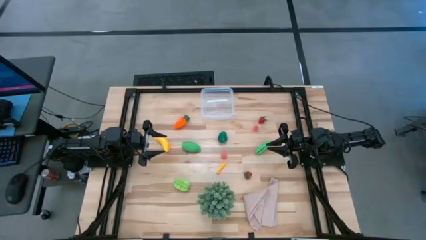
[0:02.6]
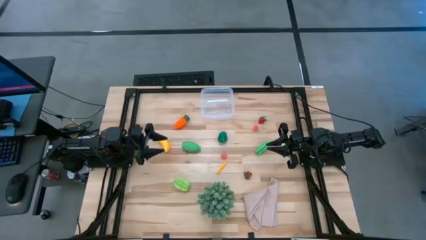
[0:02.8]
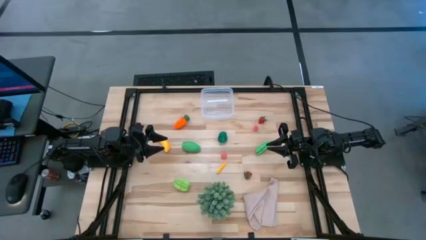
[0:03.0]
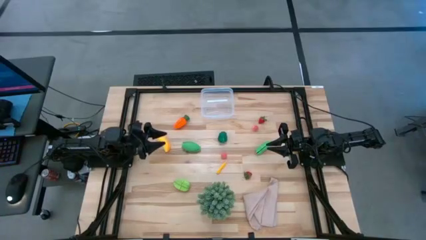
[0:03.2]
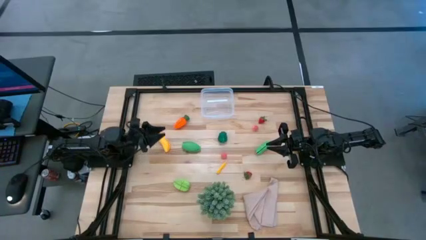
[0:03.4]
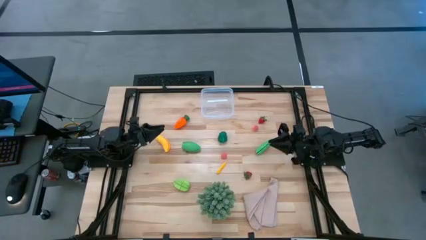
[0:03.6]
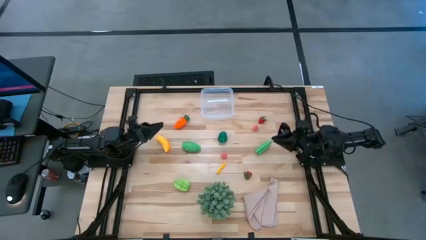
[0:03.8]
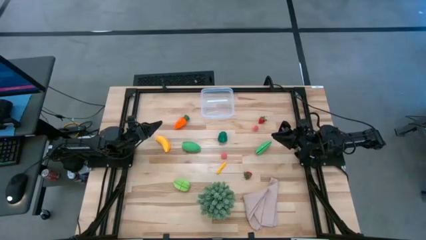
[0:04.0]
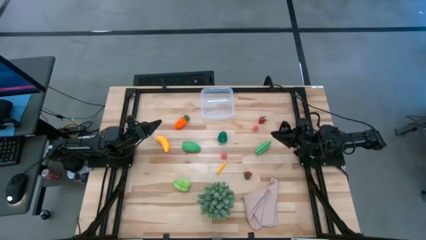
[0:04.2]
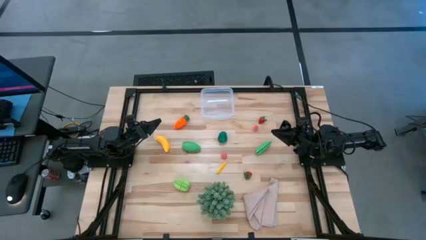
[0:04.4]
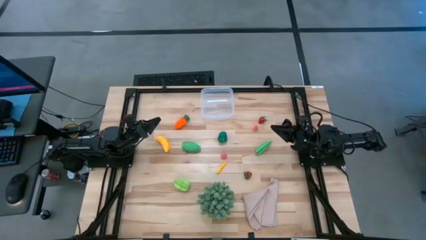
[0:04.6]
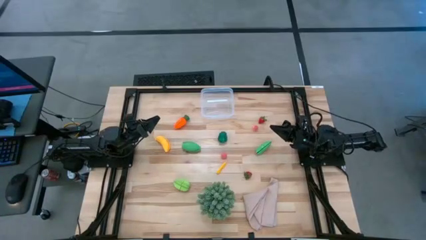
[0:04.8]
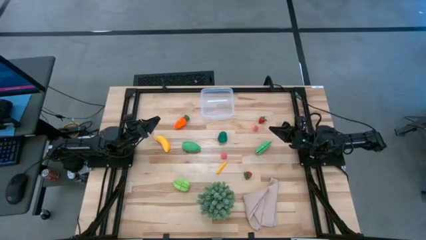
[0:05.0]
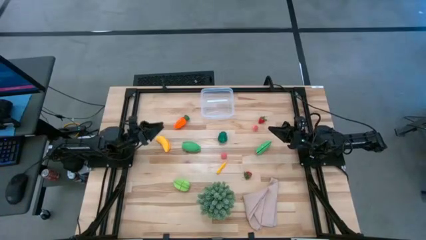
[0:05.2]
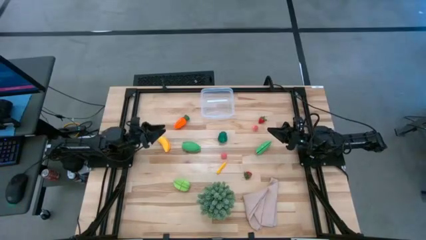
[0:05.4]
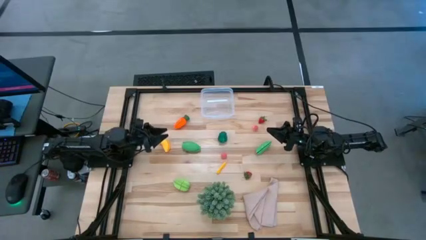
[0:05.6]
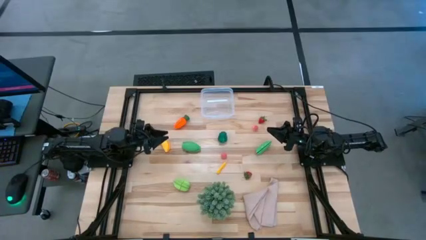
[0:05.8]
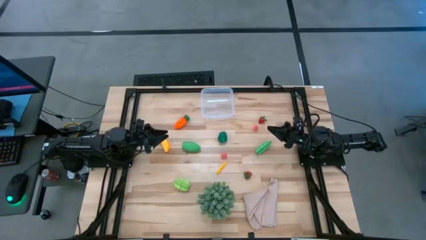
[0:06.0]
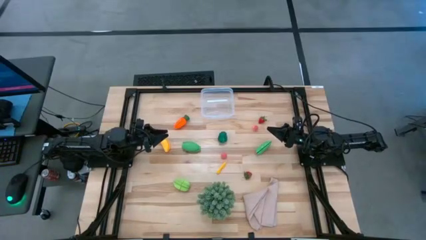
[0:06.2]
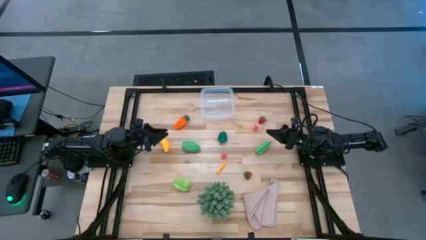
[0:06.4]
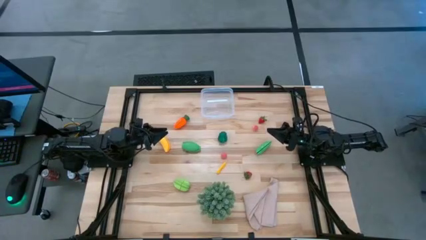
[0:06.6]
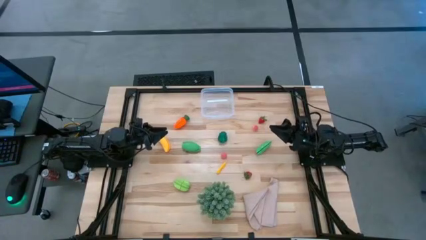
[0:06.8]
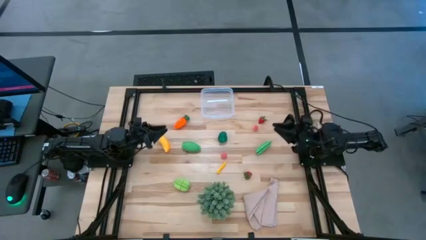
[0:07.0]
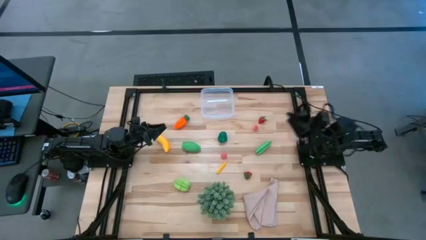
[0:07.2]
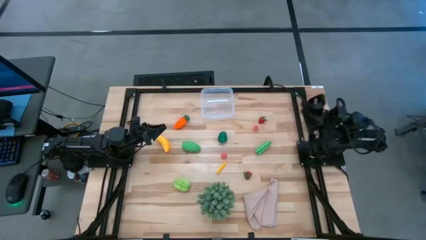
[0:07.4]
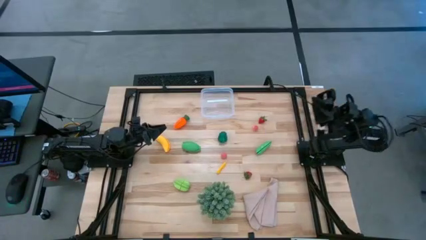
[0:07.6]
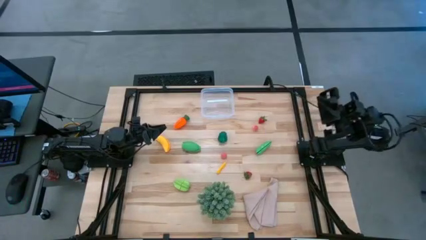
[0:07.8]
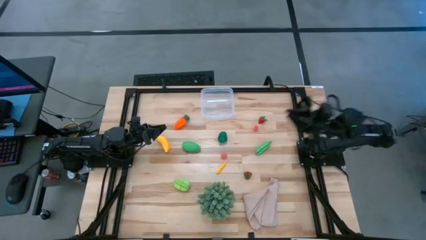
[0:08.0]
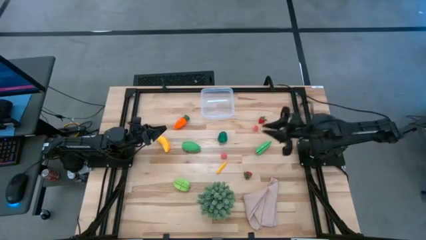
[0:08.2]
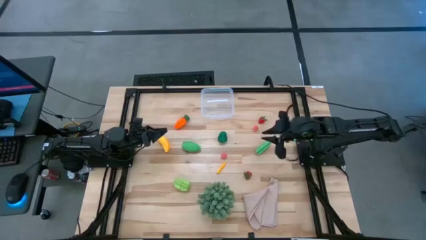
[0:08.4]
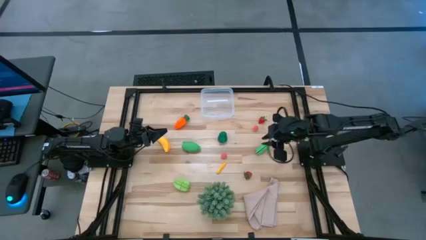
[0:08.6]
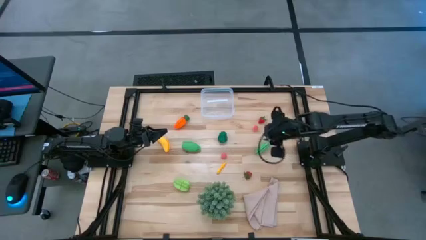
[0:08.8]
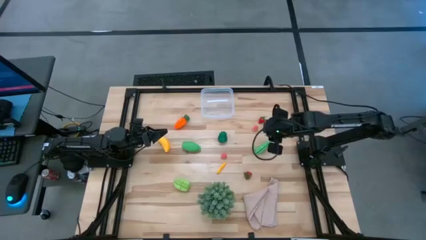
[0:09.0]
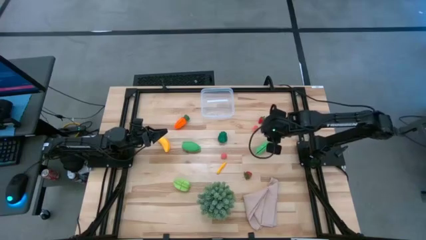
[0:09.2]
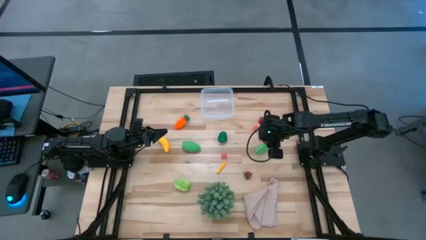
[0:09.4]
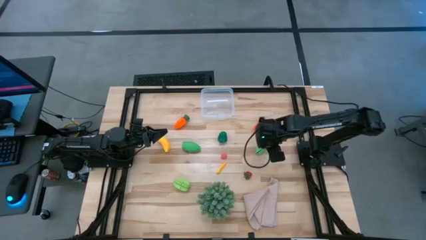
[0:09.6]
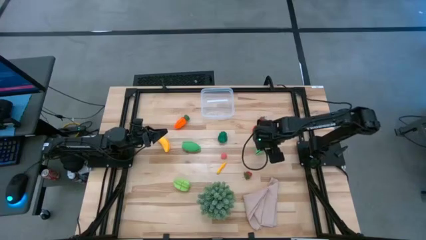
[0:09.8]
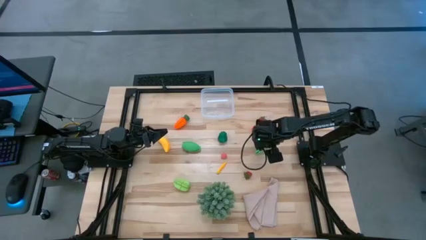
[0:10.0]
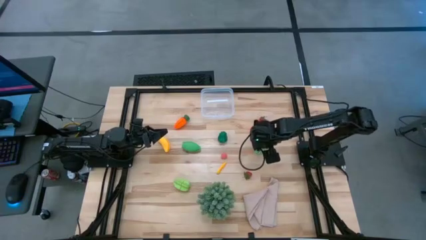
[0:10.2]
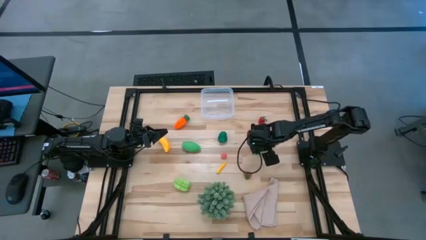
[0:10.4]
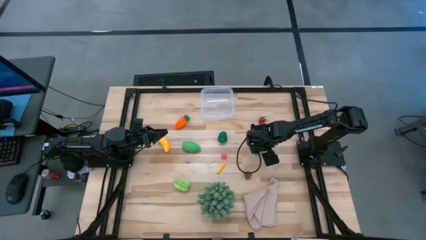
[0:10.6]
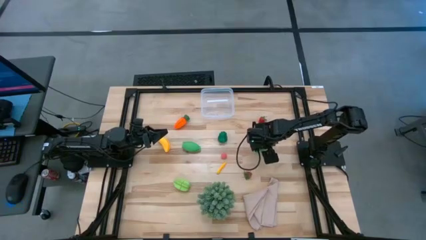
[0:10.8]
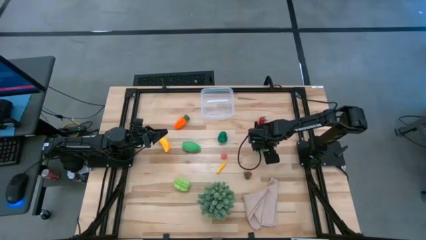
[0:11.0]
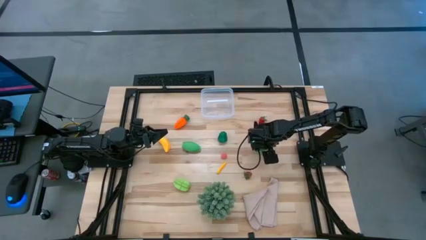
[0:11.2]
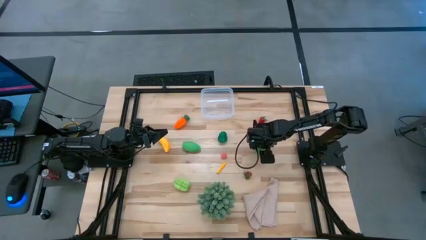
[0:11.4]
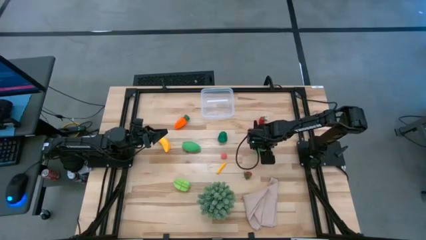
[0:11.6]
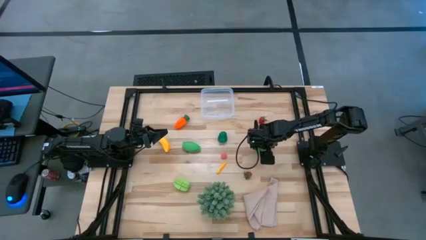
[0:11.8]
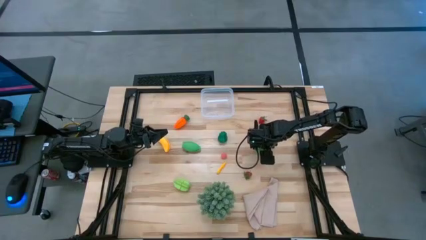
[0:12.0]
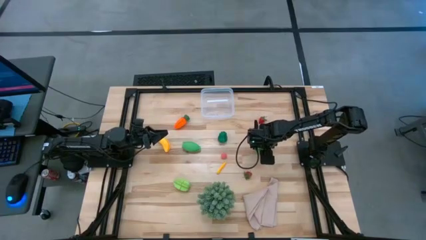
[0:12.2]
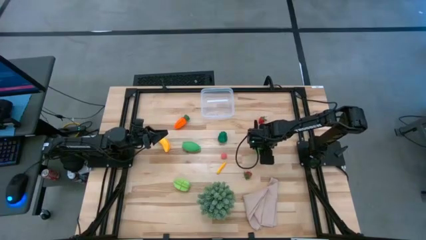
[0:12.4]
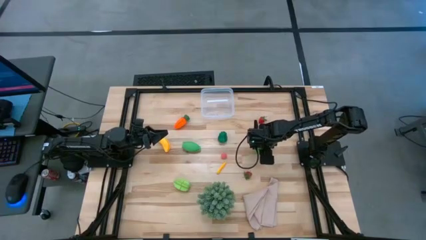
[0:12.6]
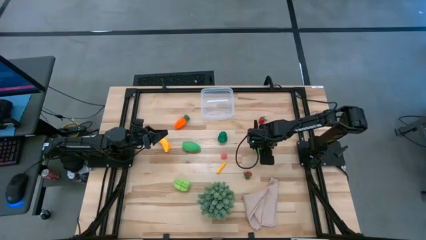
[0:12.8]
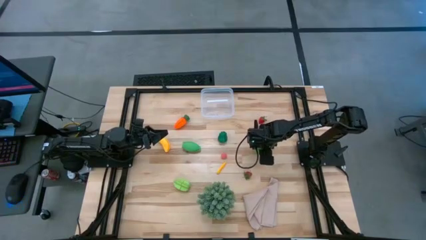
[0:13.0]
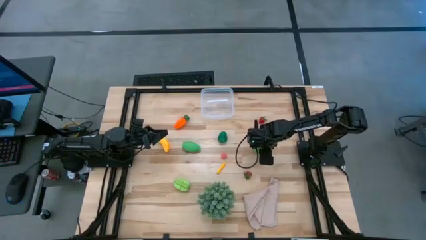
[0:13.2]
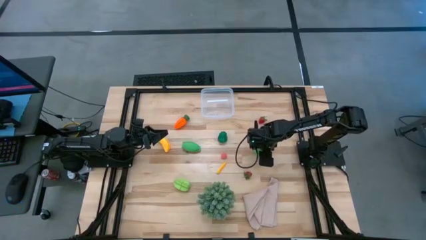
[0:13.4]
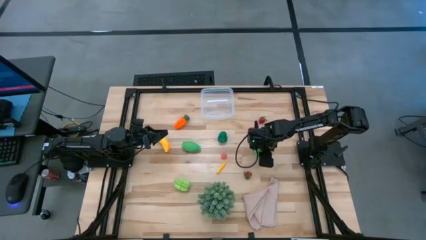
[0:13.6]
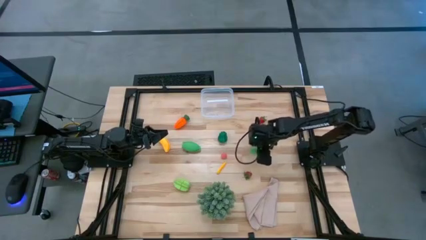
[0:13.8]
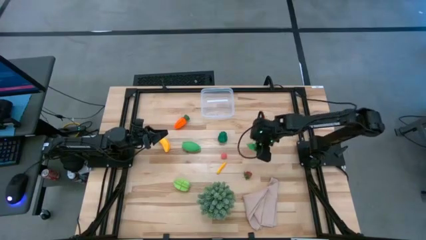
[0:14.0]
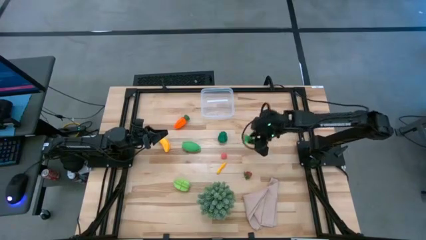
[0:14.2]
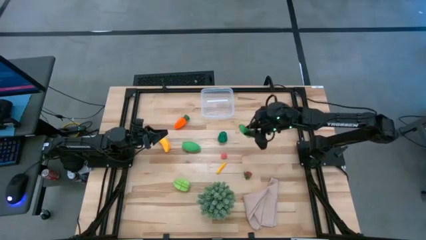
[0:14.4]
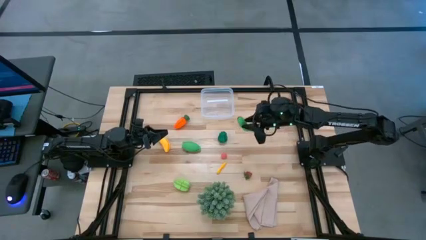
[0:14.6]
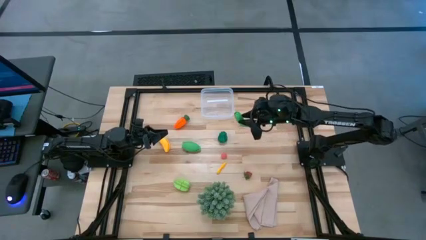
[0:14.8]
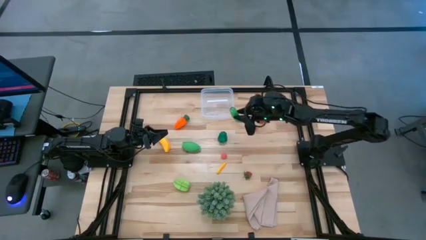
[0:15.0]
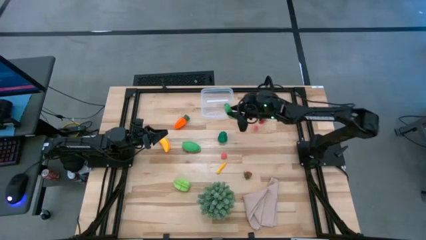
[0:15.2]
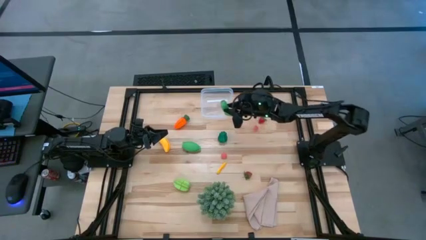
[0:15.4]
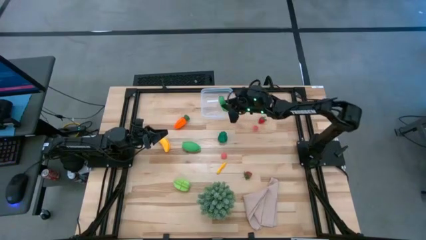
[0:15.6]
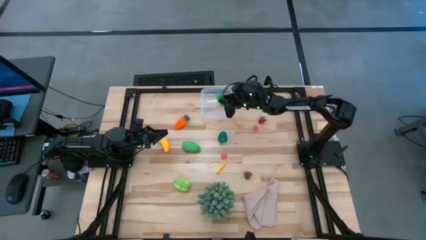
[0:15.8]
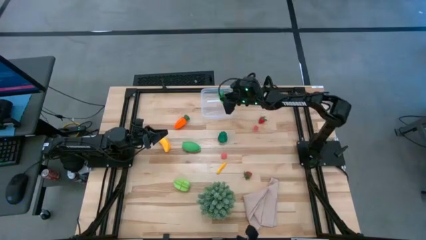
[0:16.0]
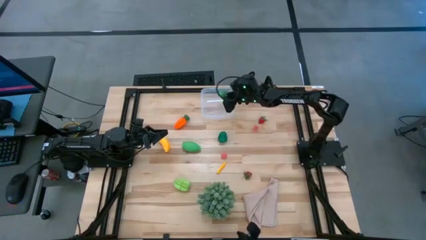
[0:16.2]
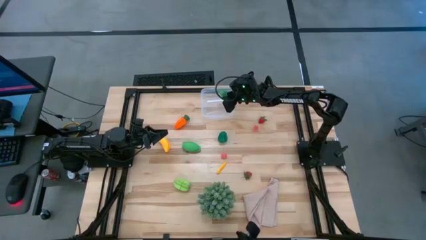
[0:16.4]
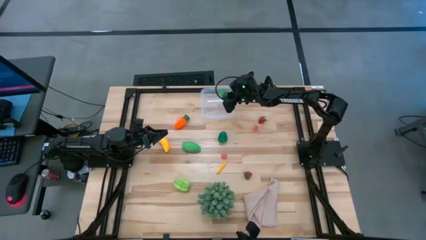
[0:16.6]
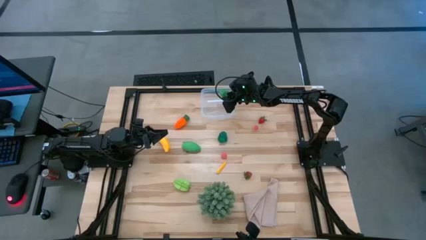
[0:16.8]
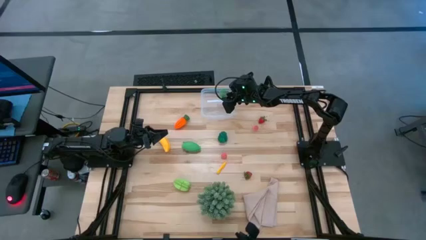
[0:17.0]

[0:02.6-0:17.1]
Task: Pick and placing Produce into tupperware
Put the pea into the transparent bin
